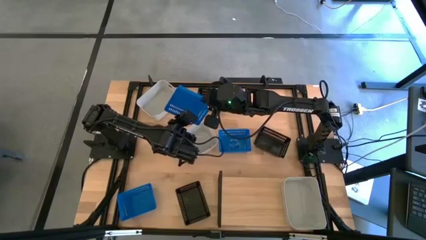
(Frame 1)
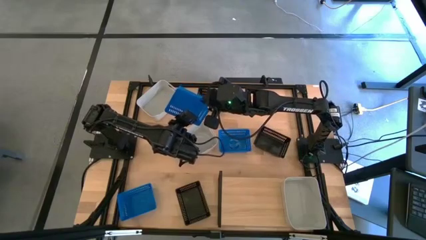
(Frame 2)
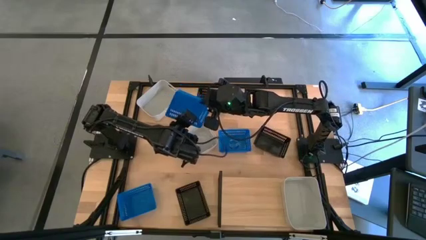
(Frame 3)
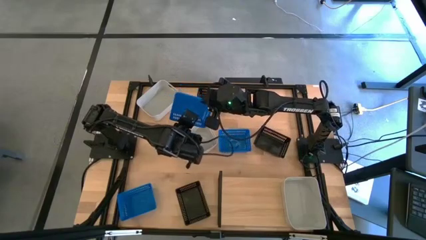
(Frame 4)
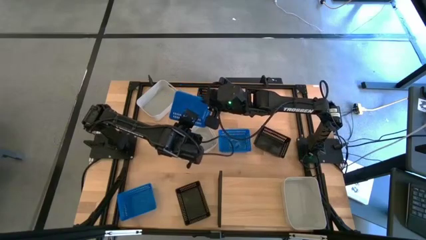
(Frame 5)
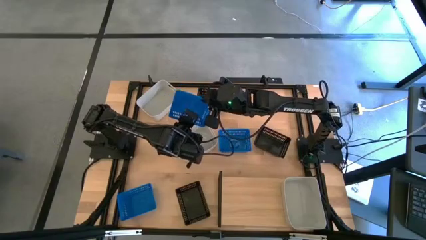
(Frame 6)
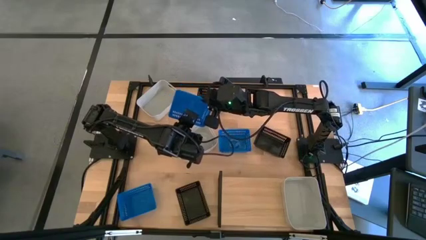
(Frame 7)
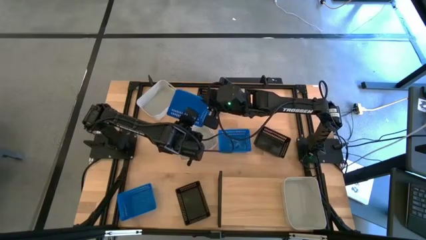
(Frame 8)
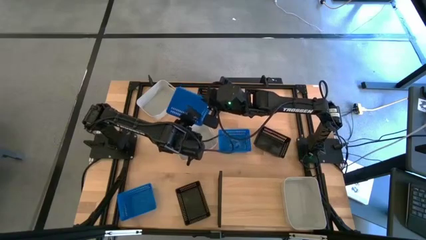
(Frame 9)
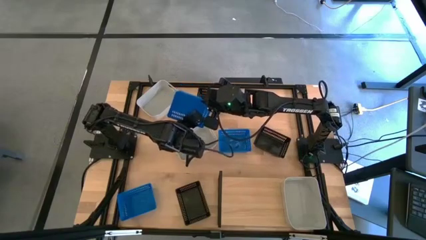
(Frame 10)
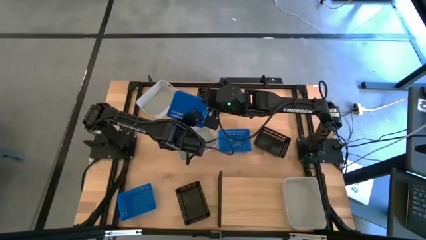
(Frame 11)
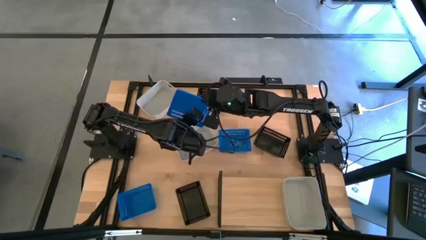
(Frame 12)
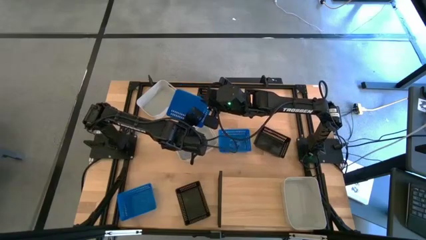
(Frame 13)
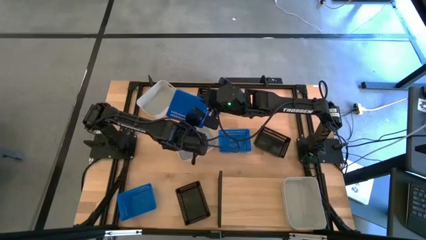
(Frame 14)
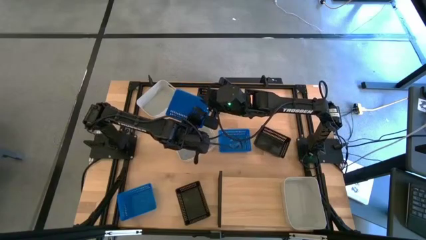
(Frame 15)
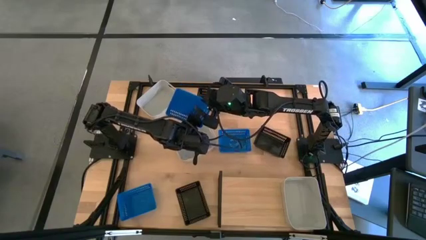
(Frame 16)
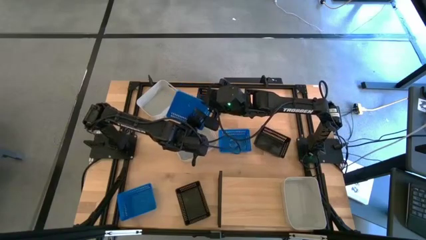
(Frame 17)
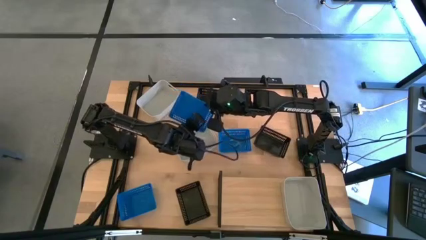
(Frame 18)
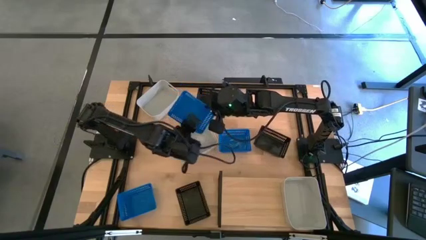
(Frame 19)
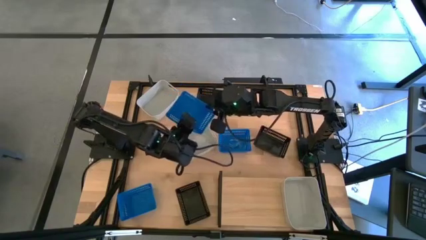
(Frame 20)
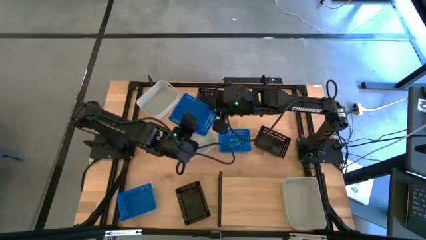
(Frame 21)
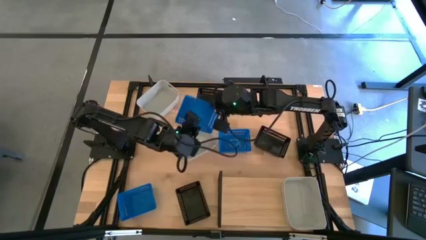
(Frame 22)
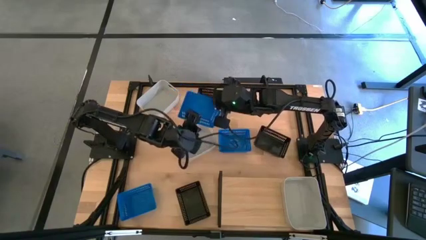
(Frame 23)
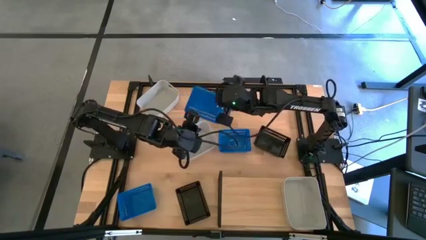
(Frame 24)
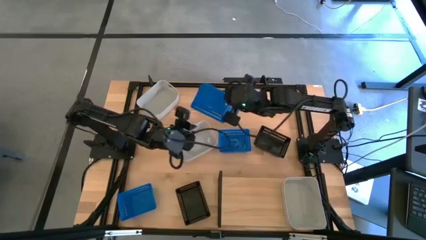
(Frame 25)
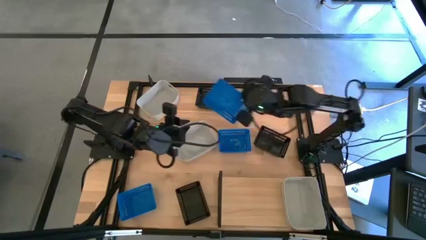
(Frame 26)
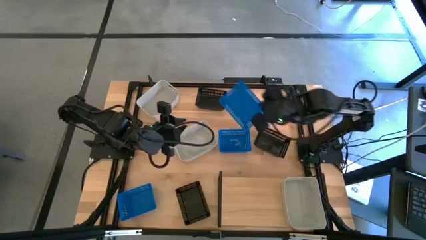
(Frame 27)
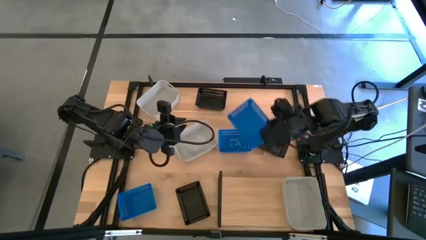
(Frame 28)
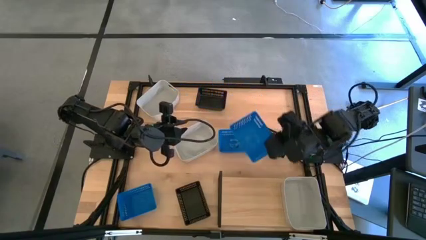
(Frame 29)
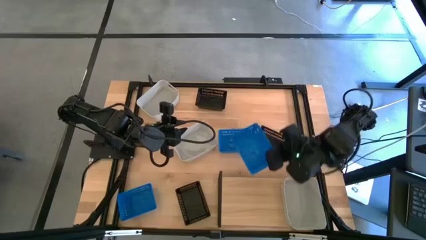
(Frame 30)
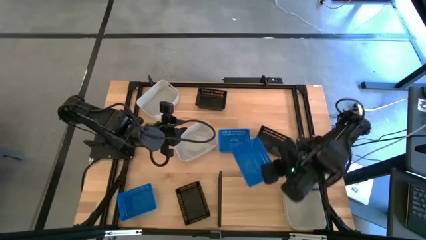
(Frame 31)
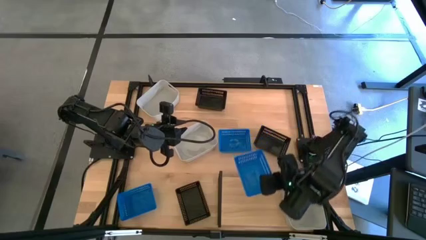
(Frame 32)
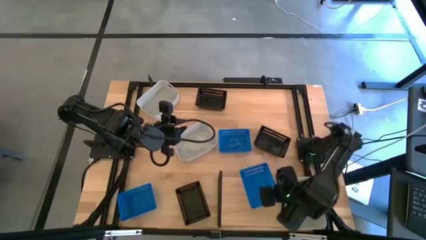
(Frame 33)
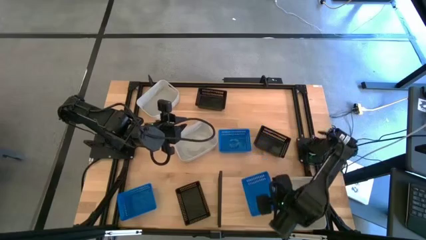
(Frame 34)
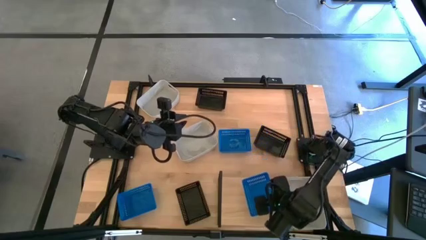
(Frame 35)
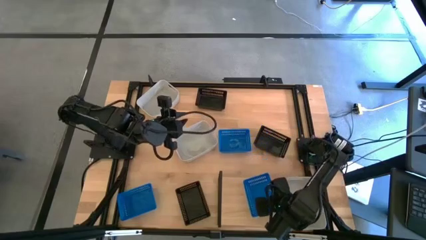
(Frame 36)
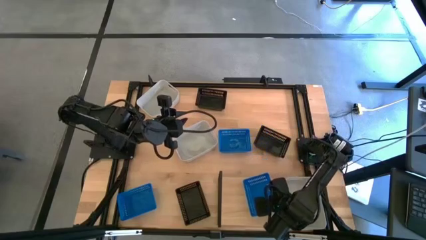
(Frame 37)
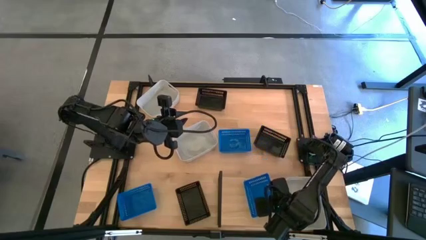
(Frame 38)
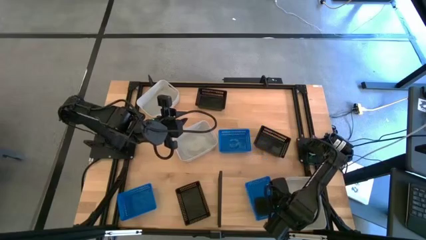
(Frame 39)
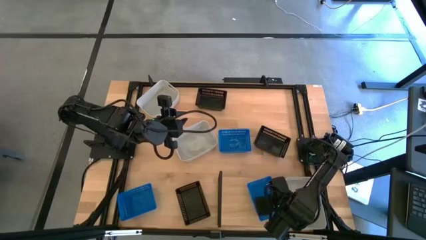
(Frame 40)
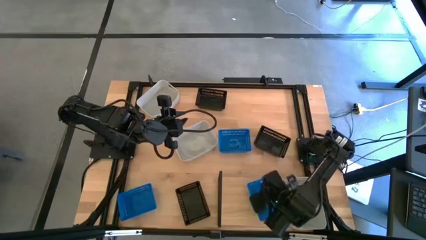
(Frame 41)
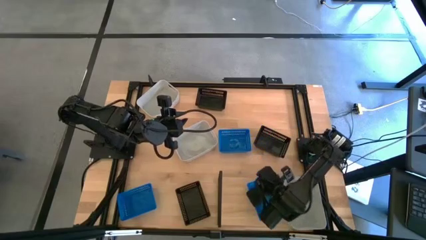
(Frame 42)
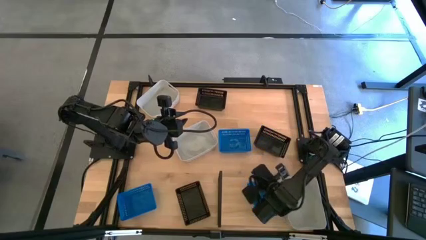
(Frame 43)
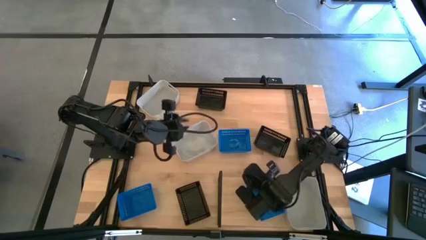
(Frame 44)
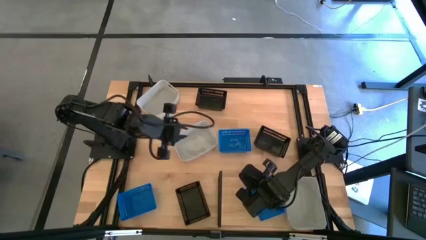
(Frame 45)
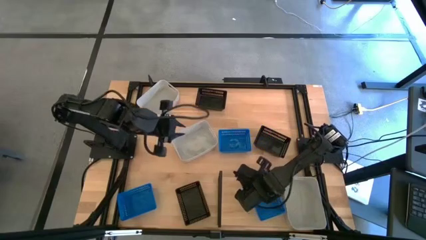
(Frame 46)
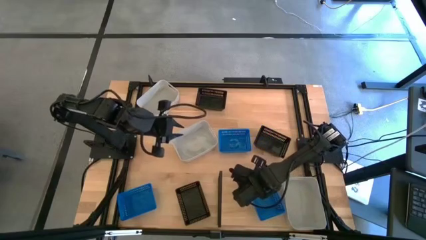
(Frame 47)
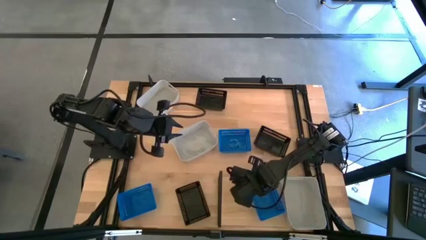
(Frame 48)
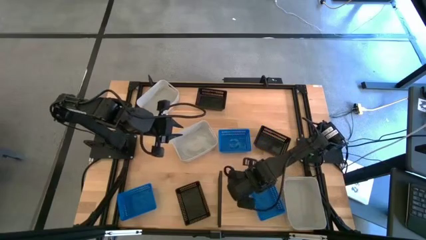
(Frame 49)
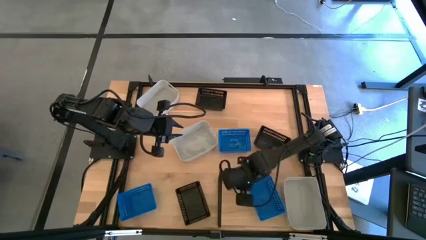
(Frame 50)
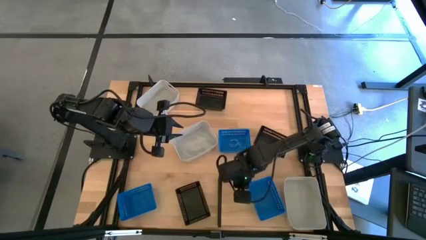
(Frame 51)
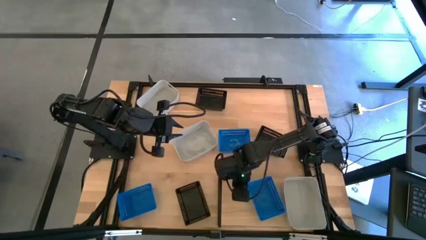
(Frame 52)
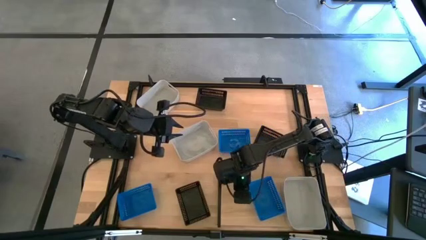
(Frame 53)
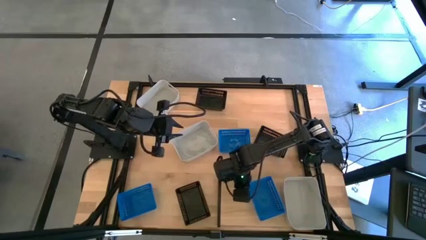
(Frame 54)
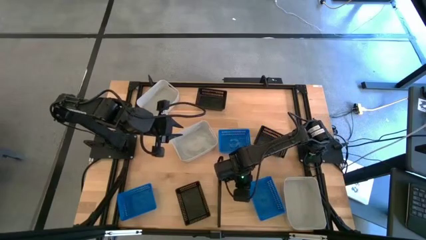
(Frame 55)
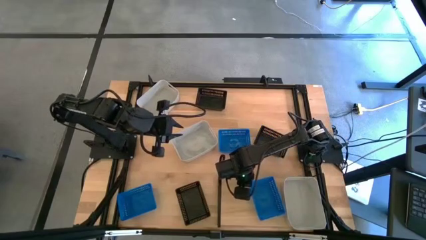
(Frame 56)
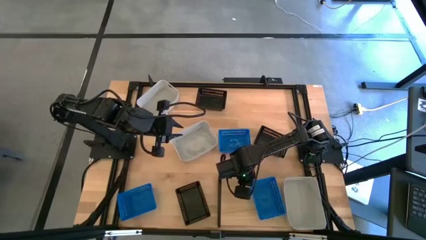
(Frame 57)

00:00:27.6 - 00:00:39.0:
Task: Stack baskets on shelf by color
Put the middle blue bin on the shelf

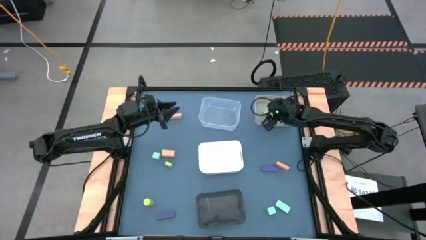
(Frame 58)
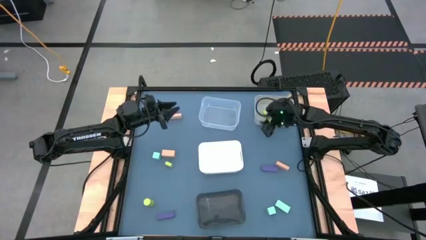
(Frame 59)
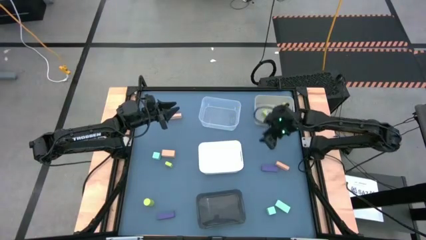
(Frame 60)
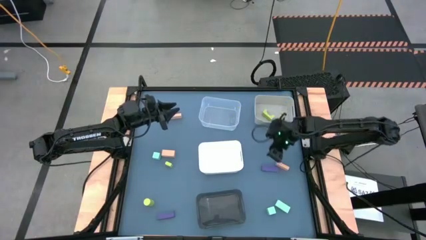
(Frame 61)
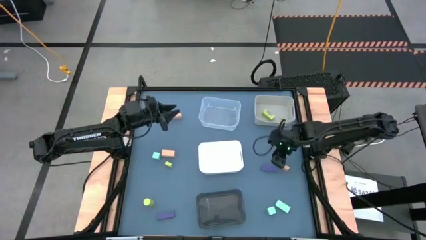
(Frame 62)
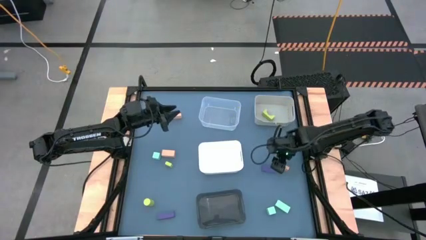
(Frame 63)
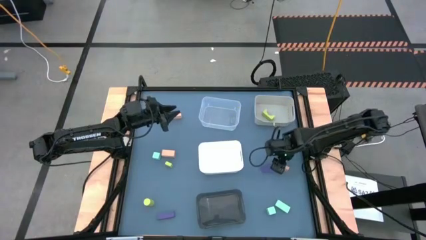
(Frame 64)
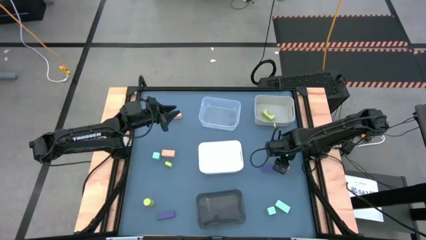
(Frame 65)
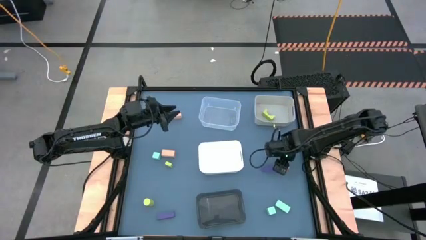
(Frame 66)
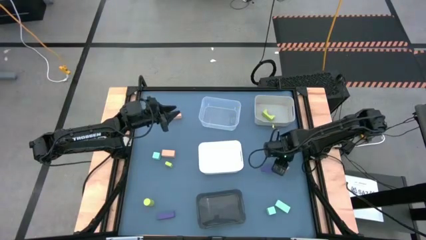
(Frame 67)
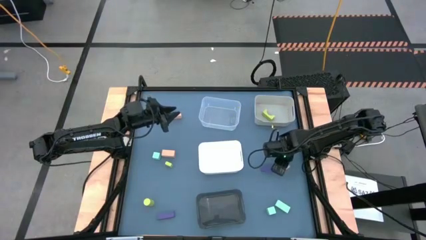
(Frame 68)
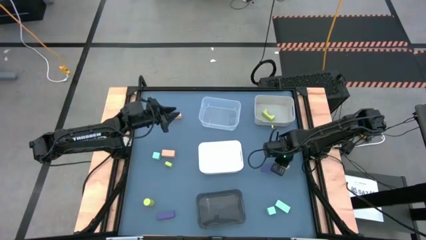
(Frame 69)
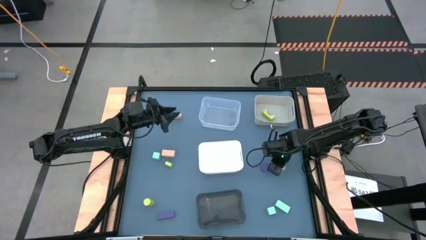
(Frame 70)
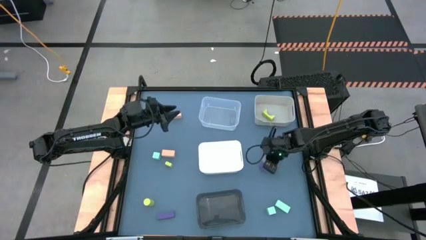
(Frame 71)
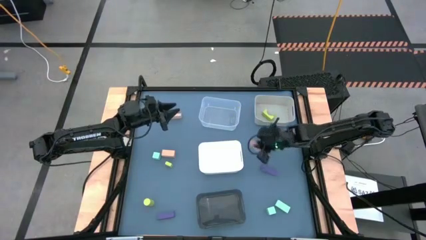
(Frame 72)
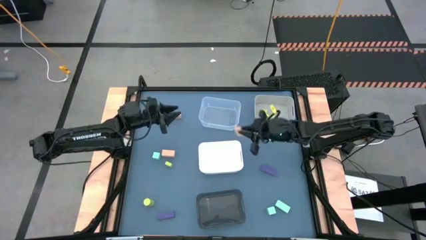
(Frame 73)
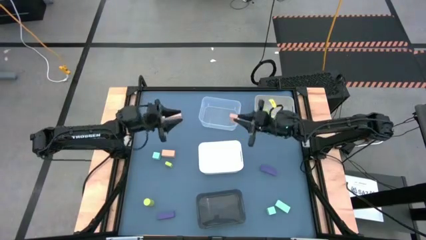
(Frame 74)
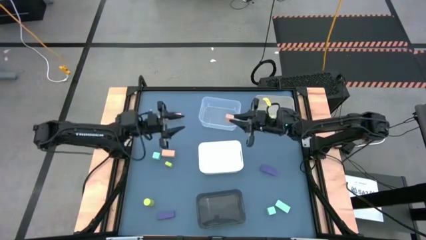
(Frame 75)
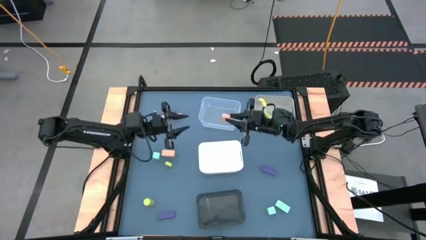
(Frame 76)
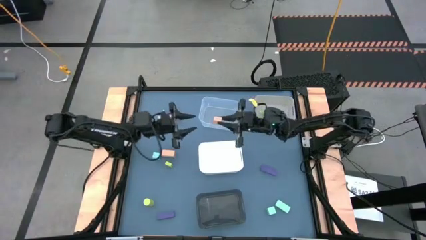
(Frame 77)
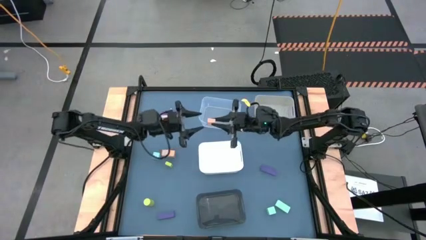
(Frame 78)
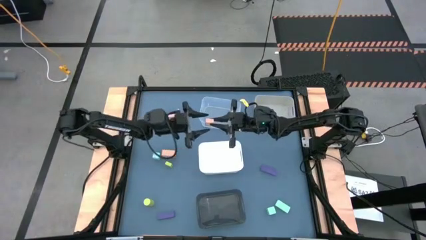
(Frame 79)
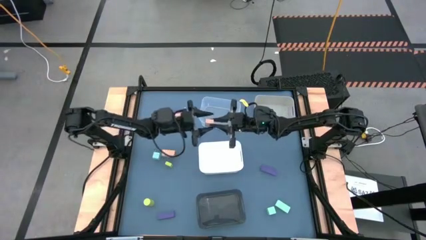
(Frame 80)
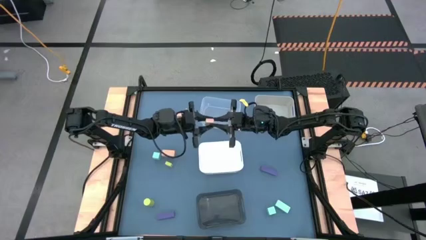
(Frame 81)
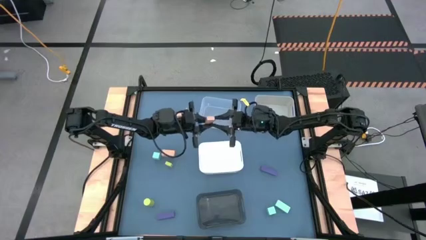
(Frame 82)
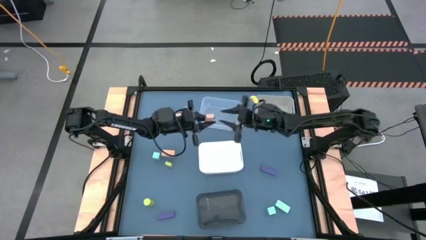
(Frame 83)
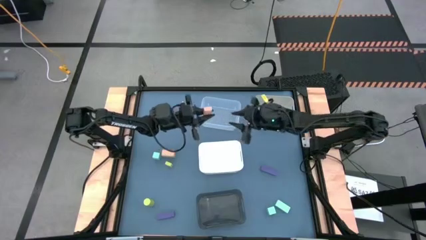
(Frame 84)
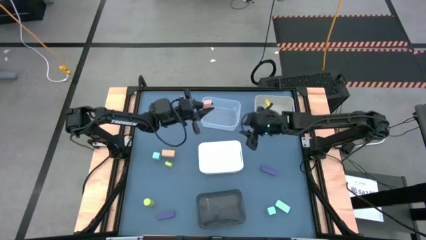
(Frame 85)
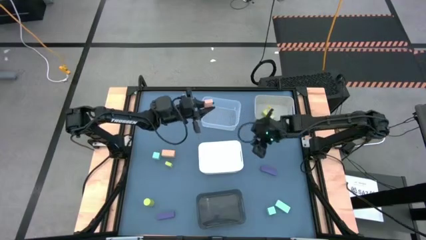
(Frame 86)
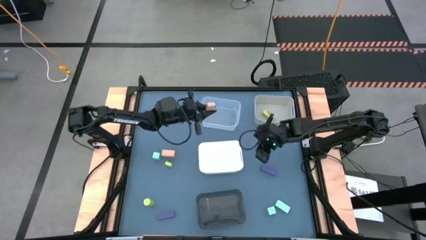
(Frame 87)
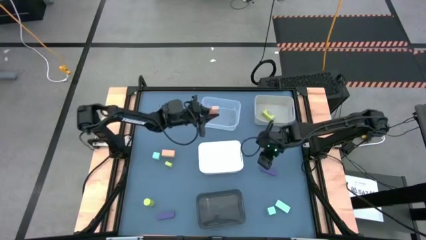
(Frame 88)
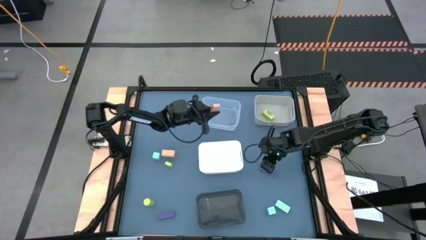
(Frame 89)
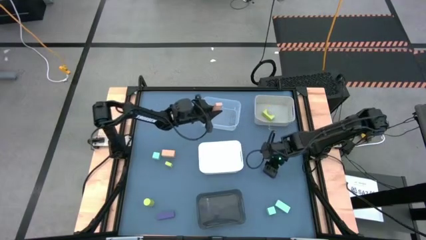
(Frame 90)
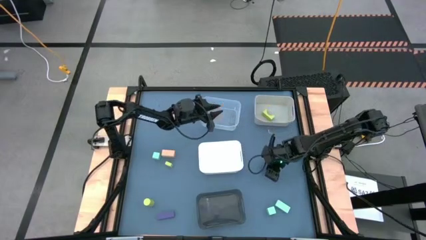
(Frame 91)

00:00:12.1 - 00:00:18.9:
Task: Sort & place blocks by color
Put the bottom right rectangle block into the transparent bin
